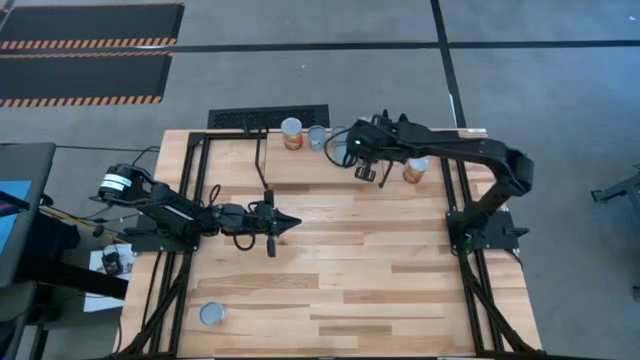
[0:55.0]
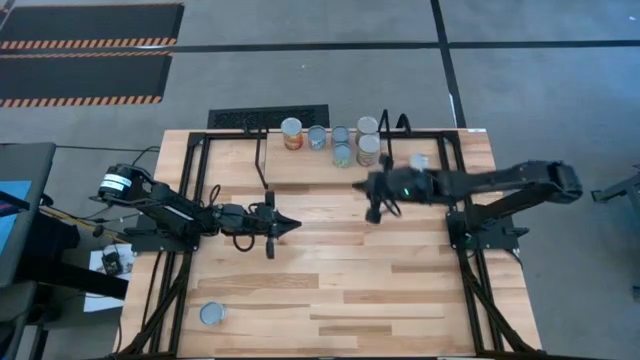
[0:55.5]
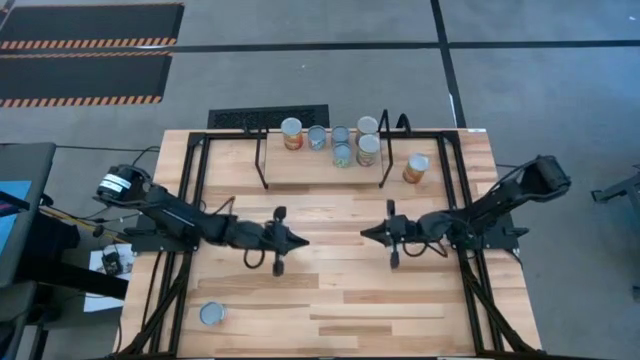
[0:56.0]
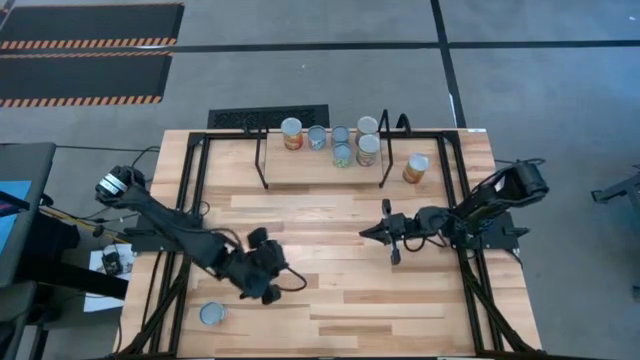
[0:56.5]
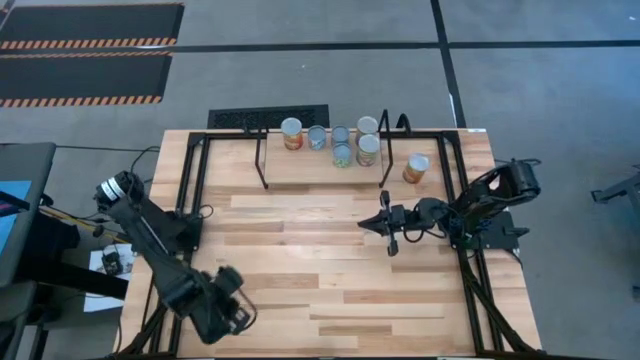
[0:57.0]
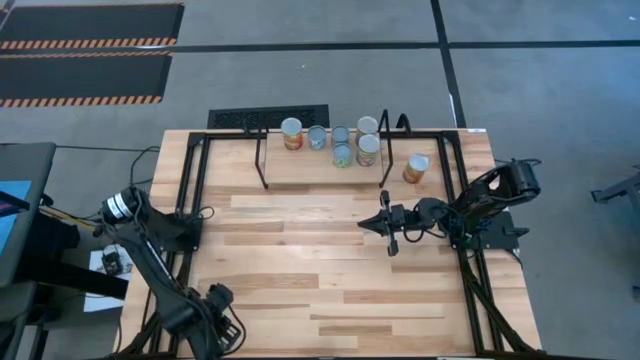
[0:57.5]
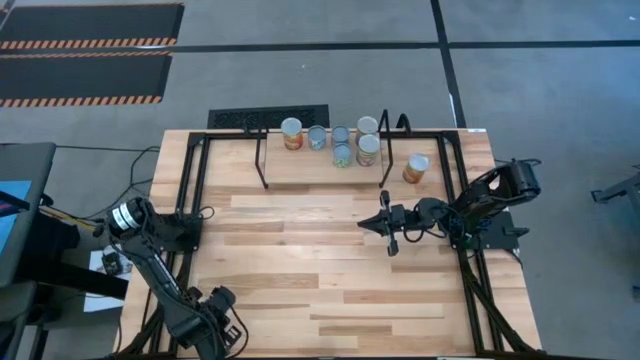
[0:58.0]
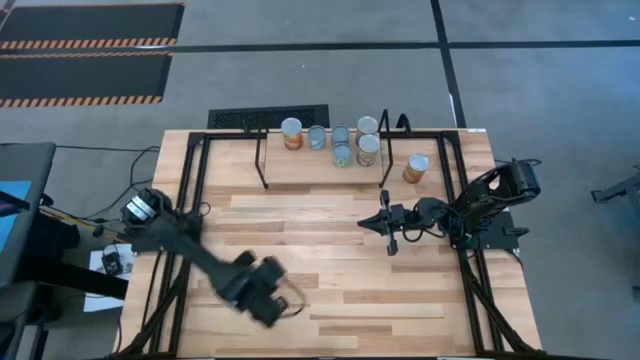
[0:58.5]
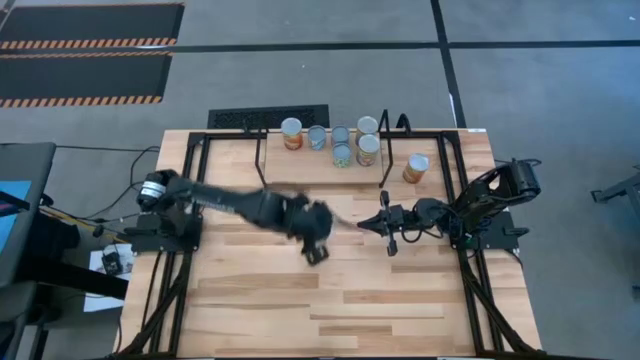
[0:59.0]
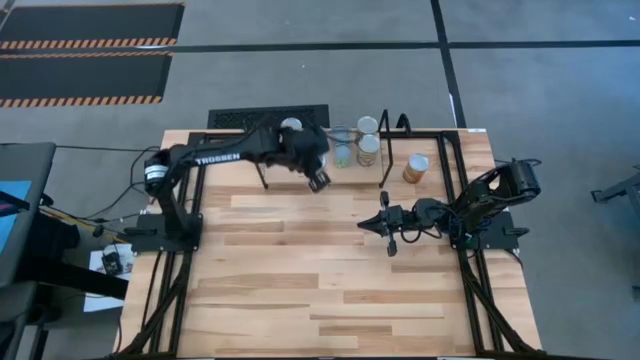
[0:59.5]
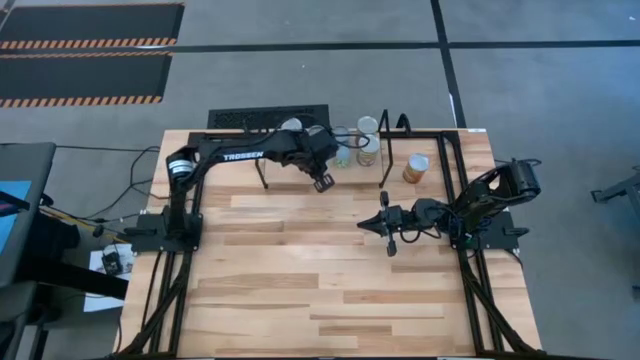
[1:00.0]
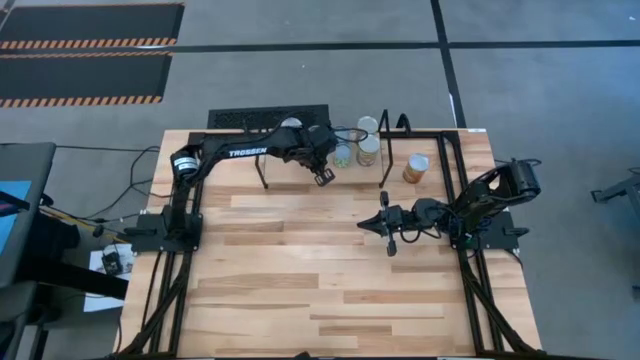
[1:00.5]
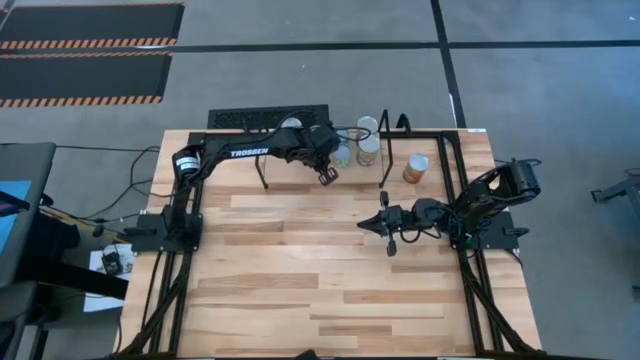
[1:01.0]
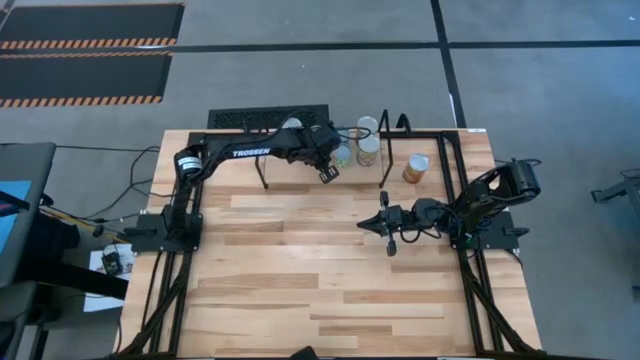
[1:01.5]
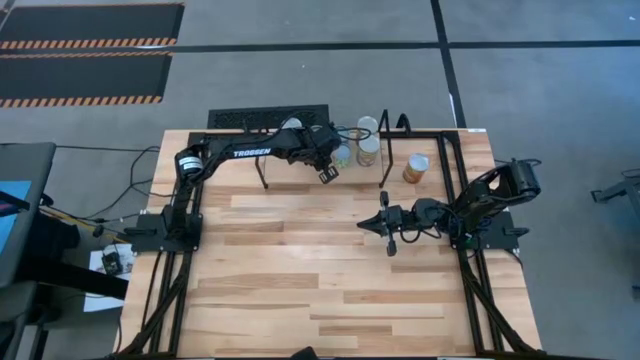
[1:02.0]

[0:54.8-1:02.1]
Task: Pick and place cans onto a shelf
Put the canned oranges on the shelf

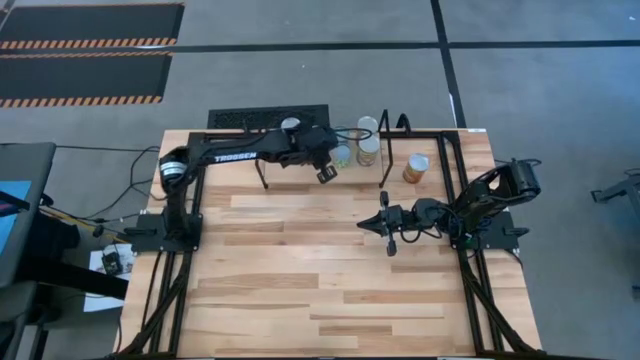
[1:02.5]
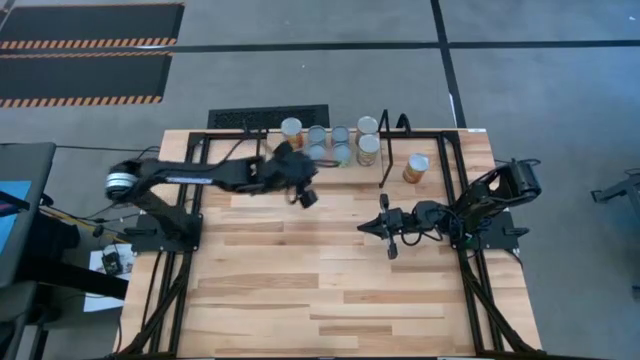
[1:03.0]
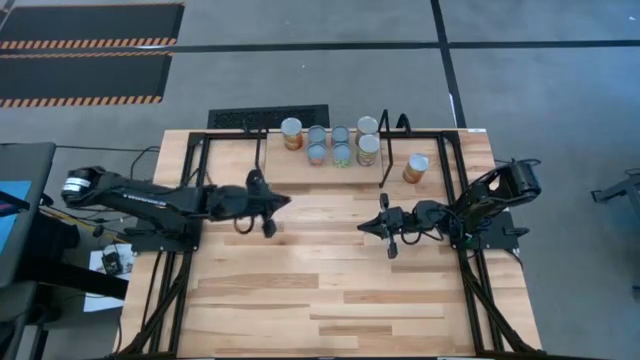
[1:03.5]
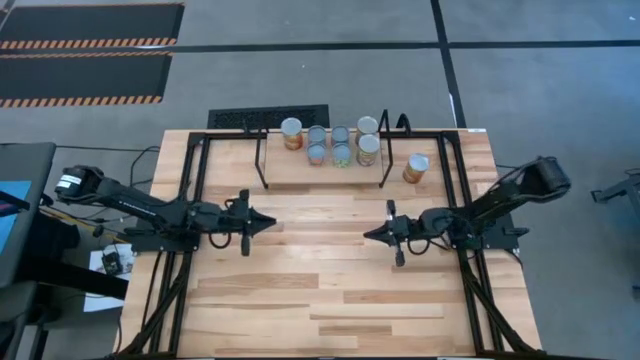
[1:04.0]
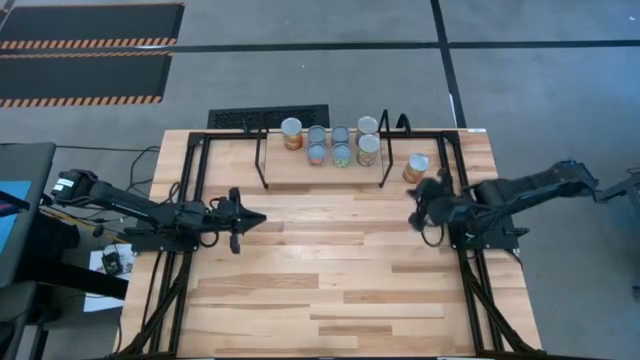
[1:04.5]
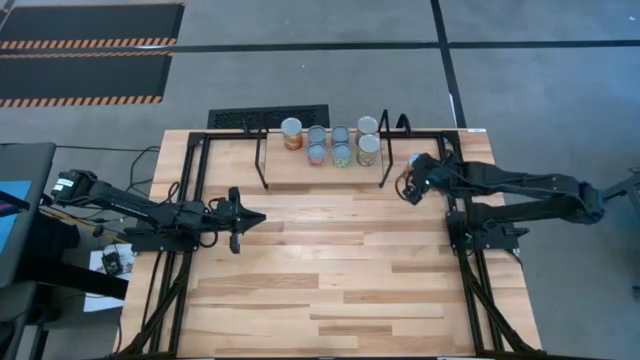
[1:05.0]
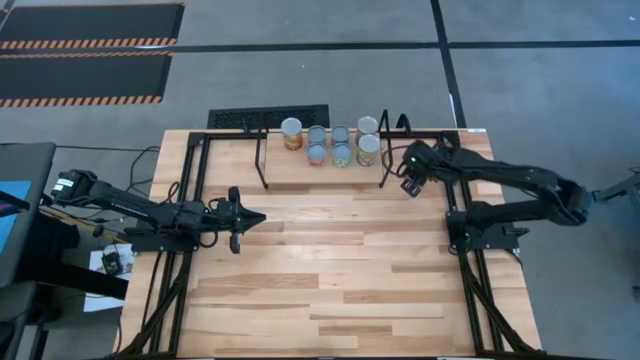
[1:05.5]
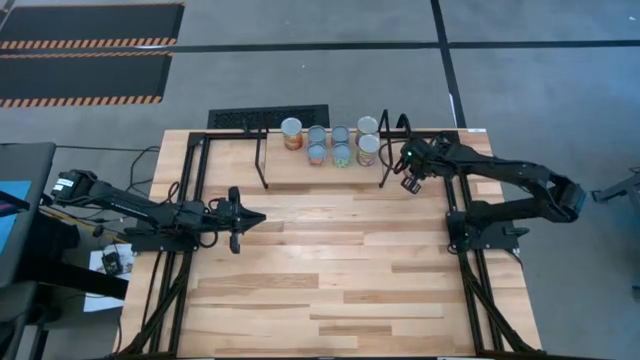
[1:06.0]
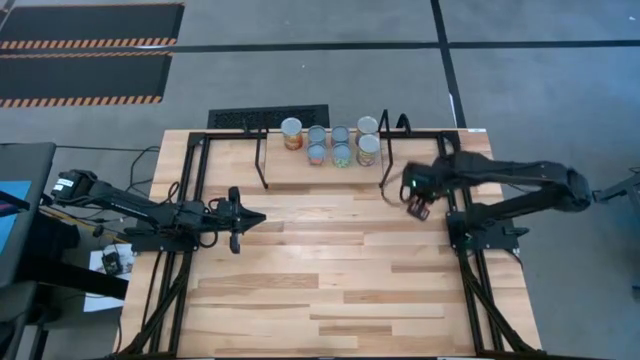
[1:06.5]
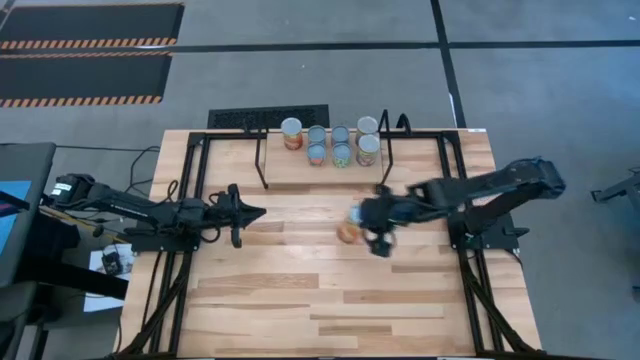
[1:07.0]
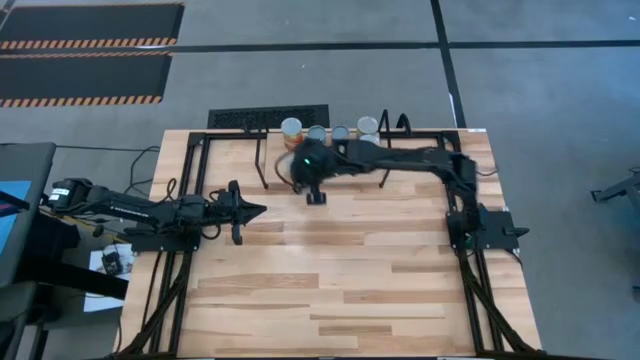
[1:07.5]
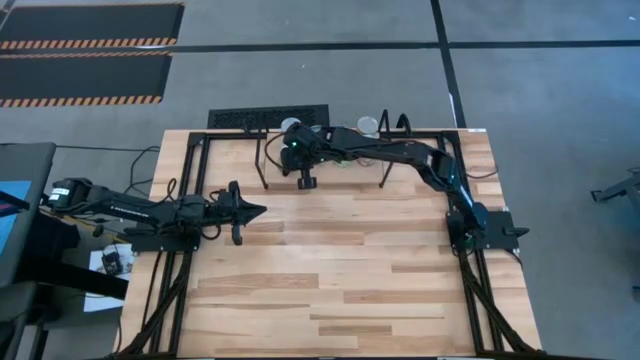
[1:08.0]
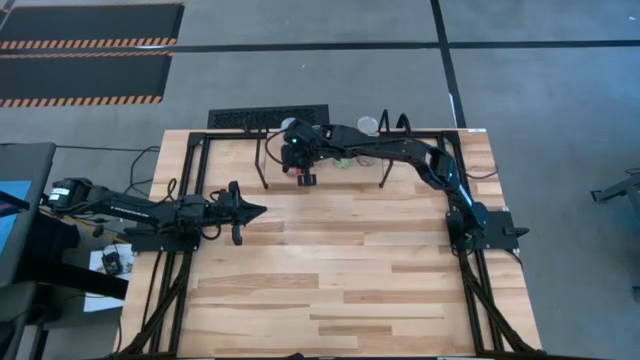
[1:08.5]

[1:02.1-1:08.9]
Put the canned corn on the shelf

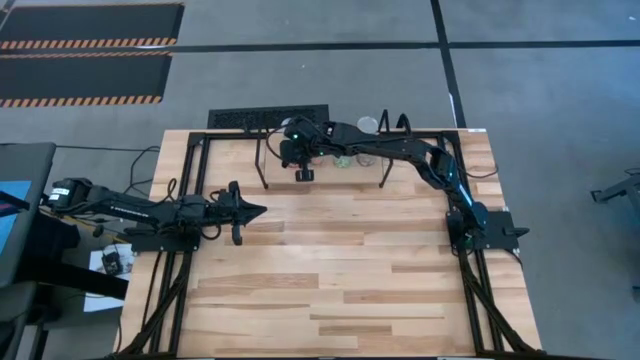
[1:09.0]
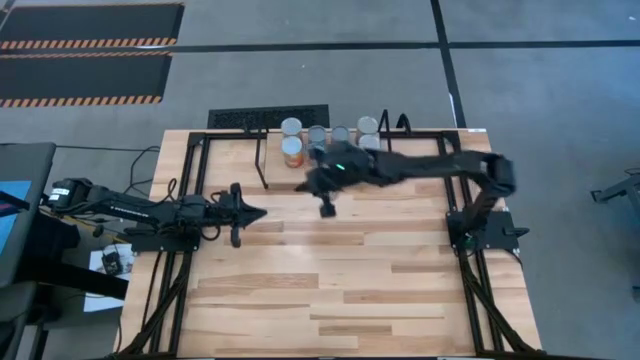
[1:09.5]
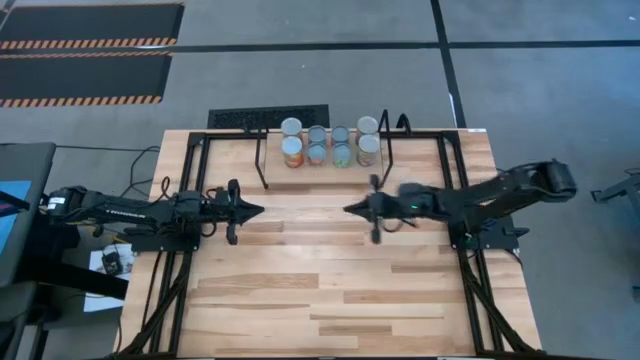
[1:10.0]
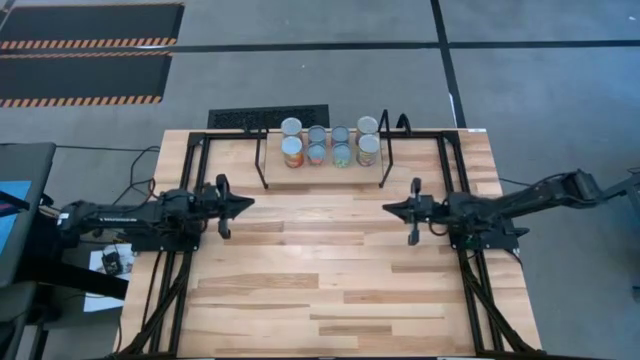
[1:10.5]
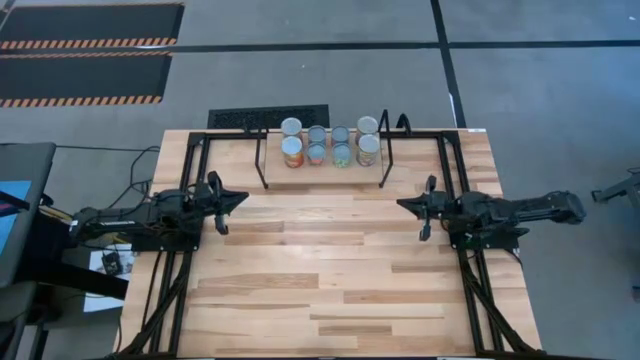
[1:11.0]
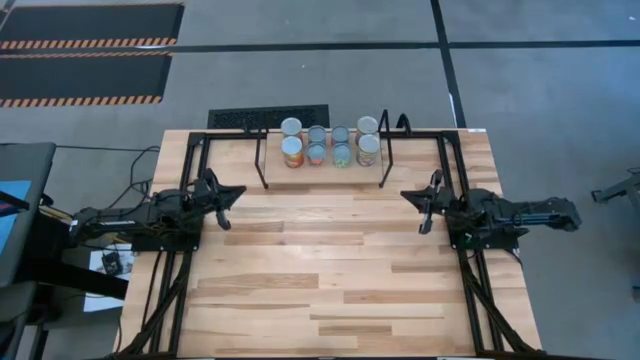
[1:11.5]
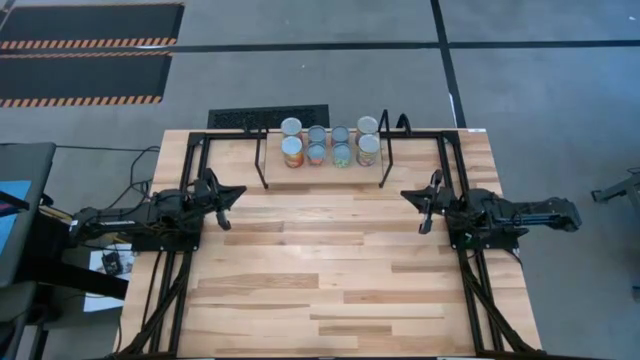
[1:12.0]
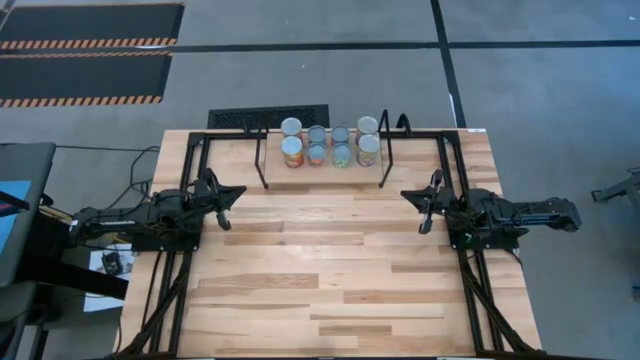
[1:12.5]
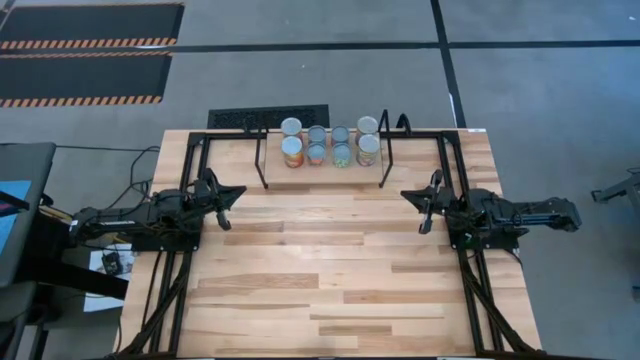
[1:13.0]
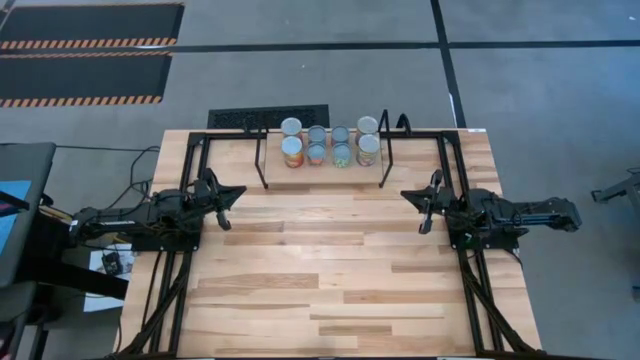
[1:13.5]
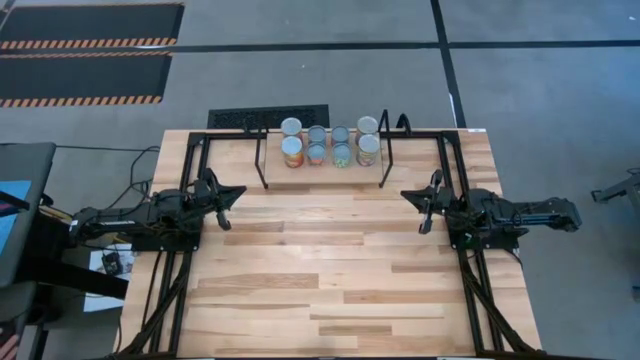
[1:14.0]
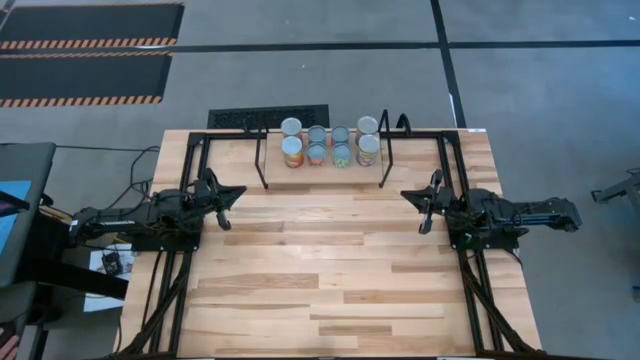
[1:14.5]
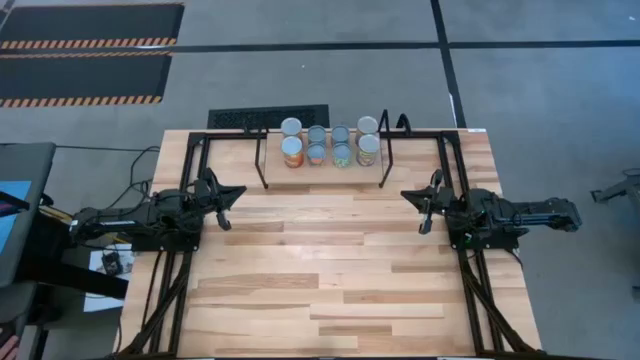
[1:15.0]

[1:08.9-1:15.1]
Return to Home Position

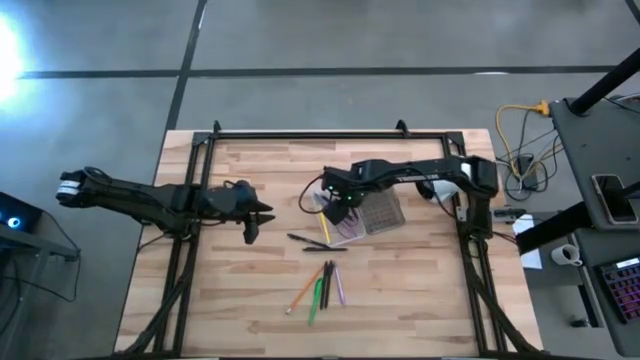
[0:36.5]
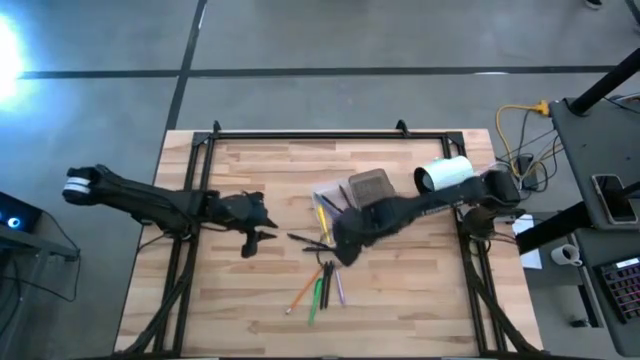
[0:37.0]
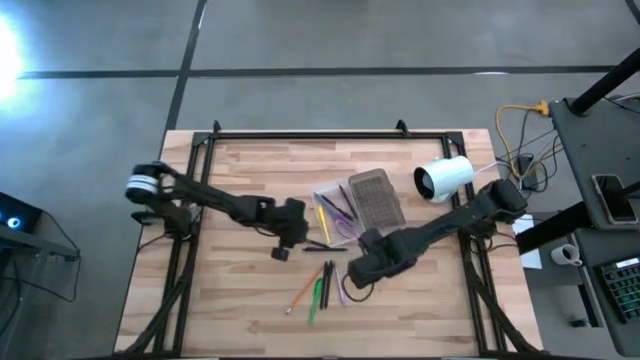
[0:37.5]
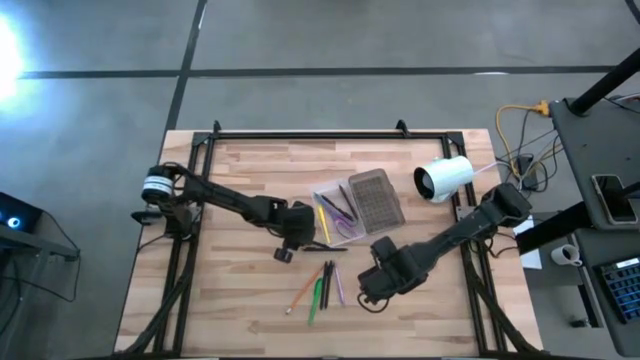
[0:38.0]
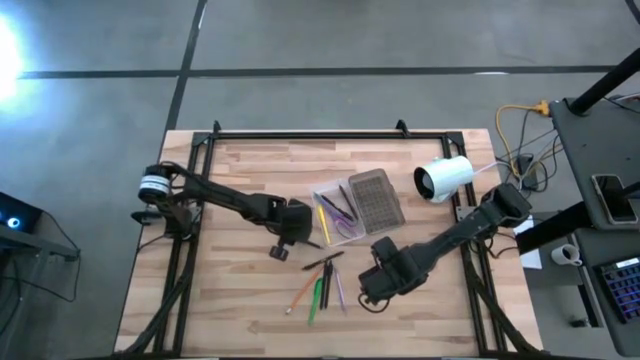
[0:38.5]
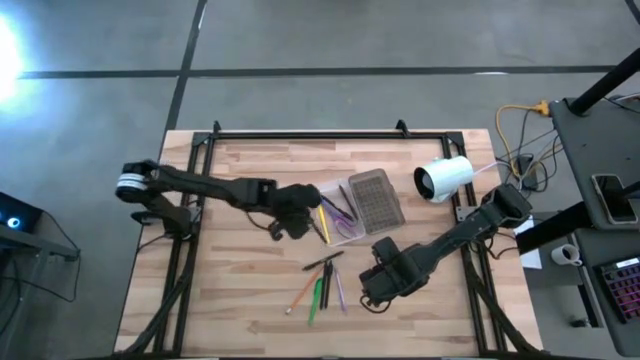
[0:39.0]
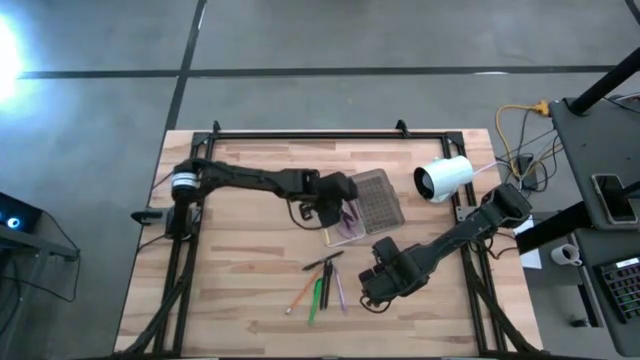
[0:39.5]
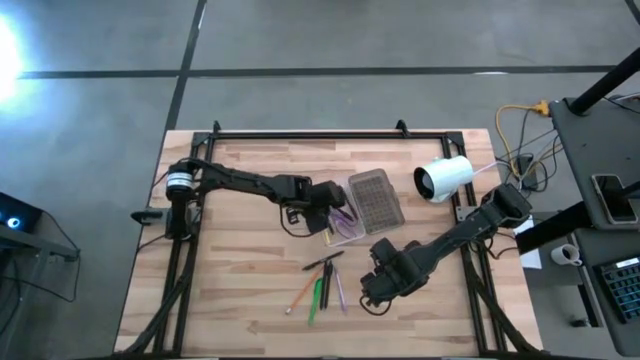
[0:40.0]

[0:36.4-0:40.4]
Task: Pick & place school supplies into a supply box
Put the black pen into the supply box
